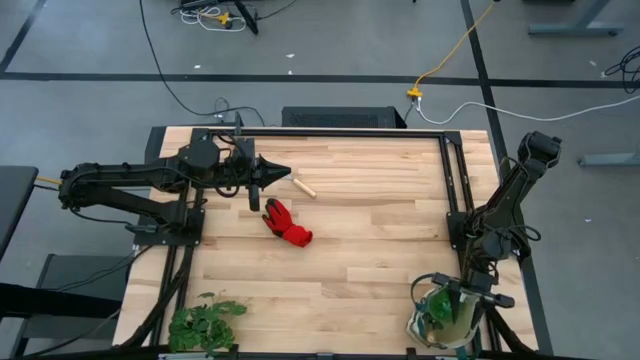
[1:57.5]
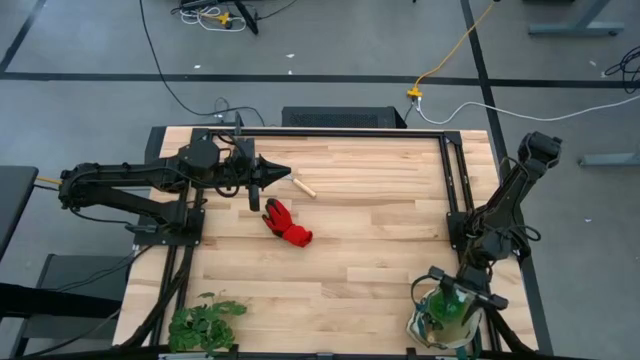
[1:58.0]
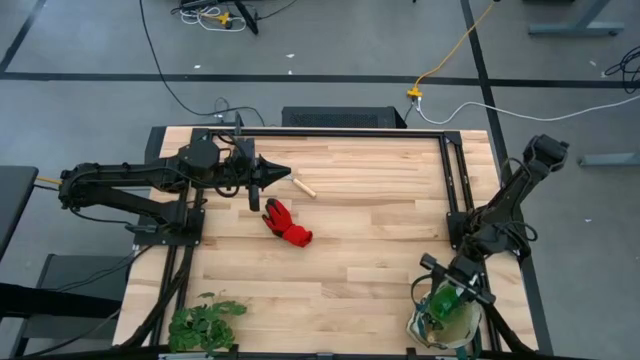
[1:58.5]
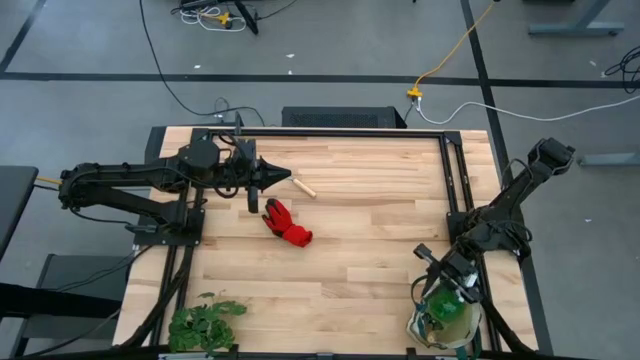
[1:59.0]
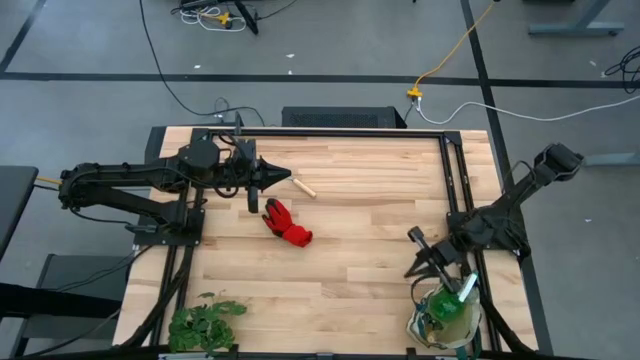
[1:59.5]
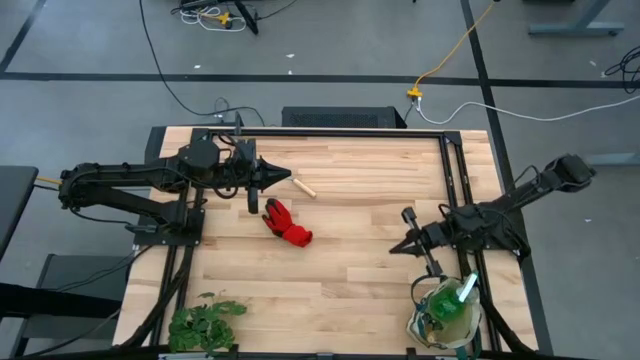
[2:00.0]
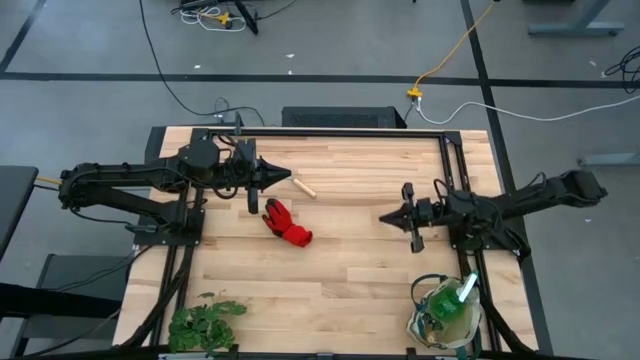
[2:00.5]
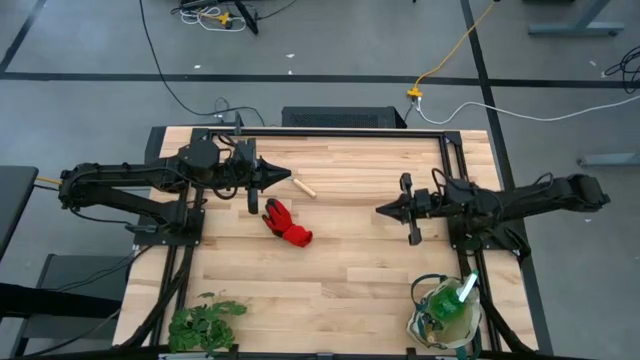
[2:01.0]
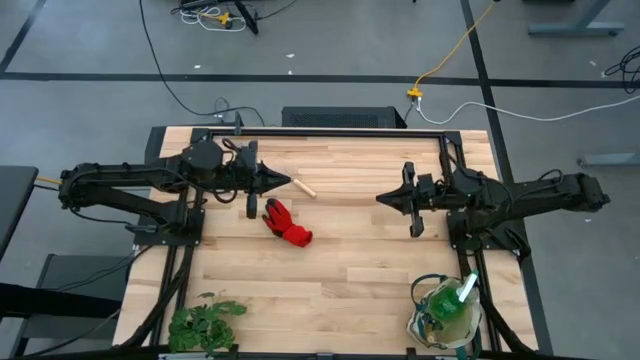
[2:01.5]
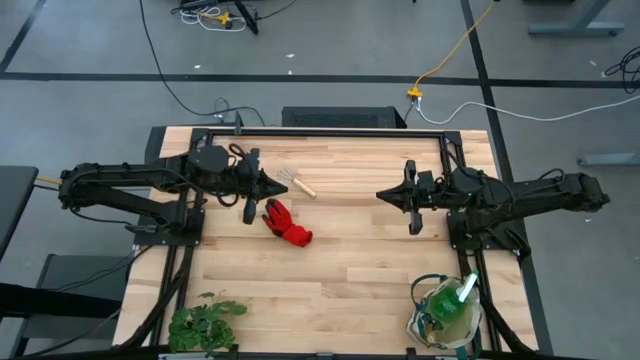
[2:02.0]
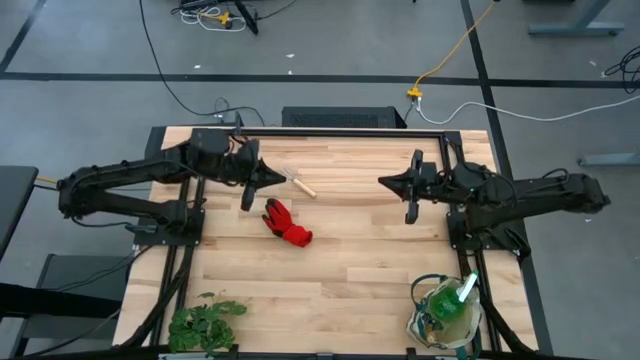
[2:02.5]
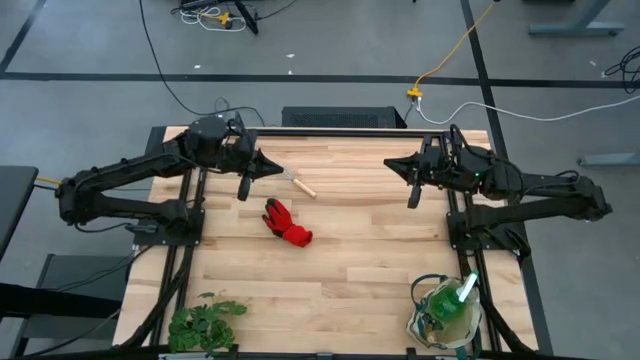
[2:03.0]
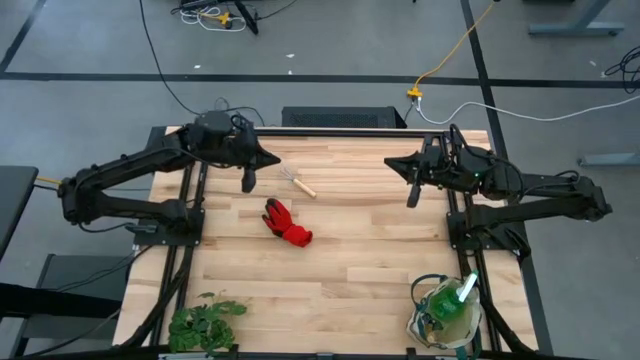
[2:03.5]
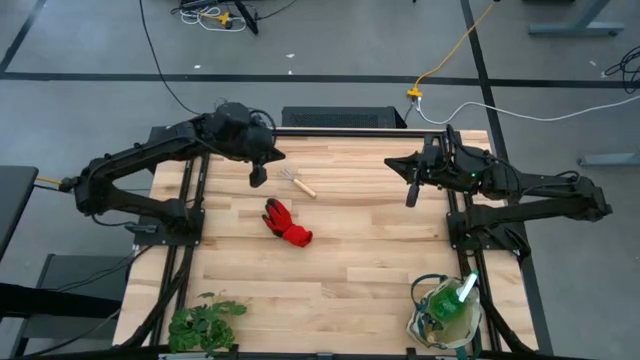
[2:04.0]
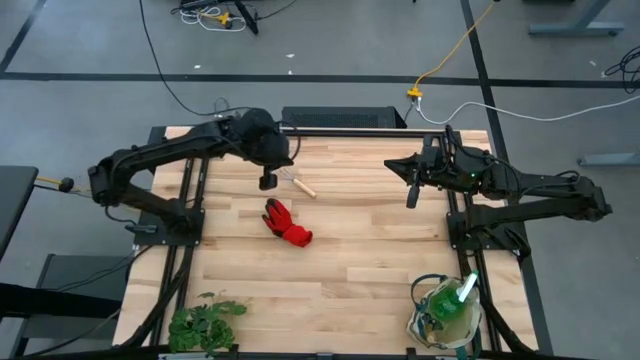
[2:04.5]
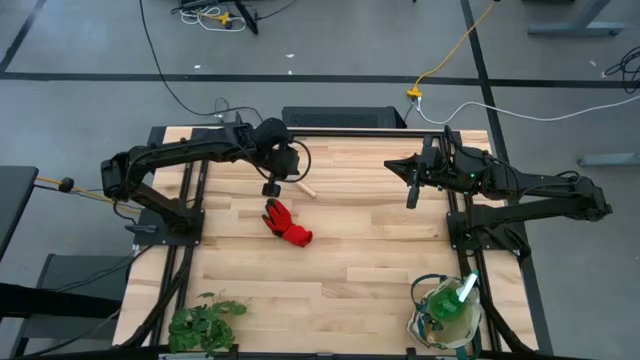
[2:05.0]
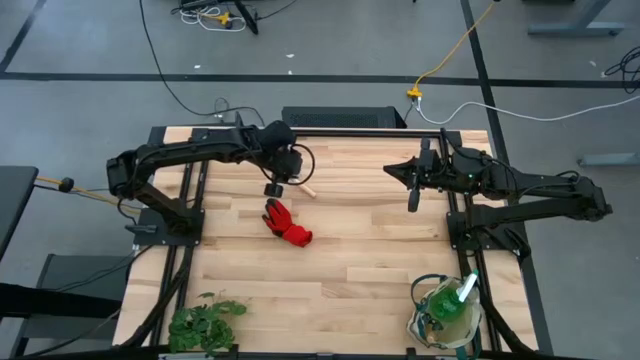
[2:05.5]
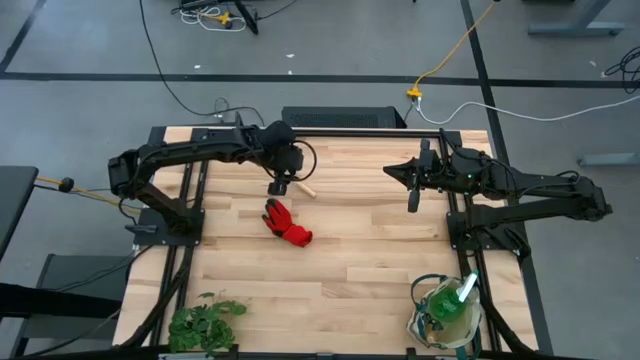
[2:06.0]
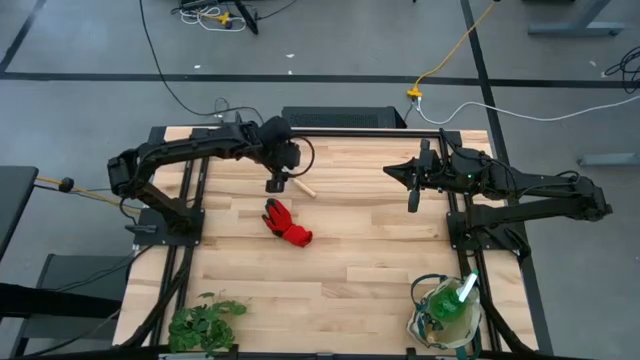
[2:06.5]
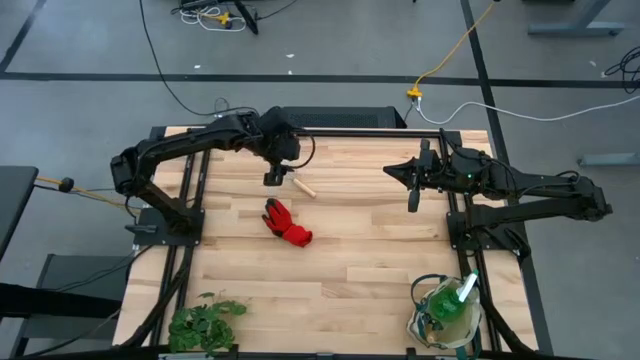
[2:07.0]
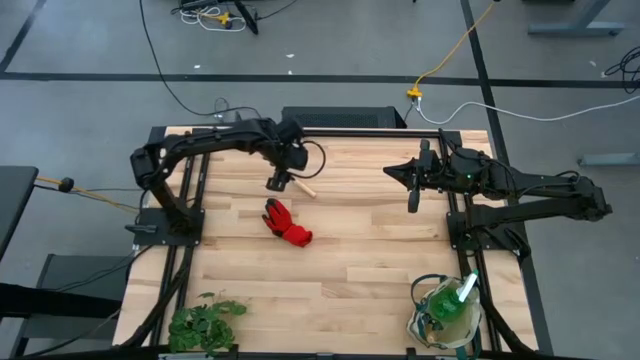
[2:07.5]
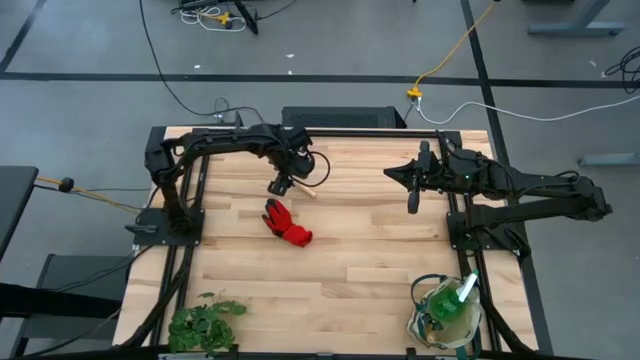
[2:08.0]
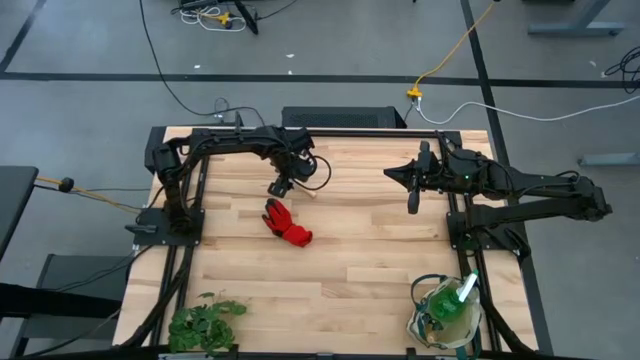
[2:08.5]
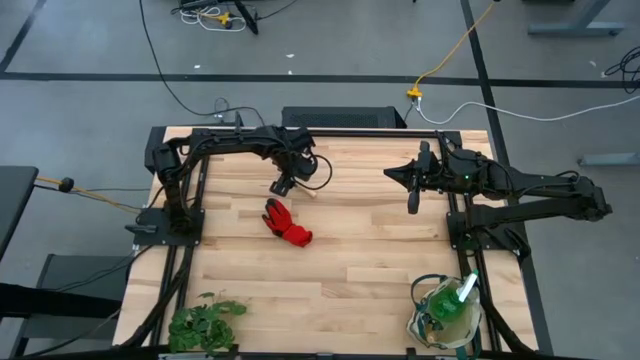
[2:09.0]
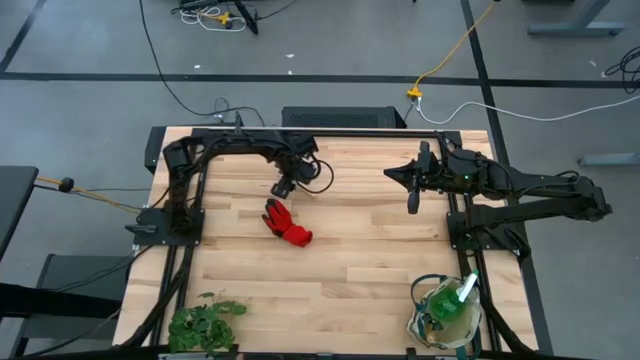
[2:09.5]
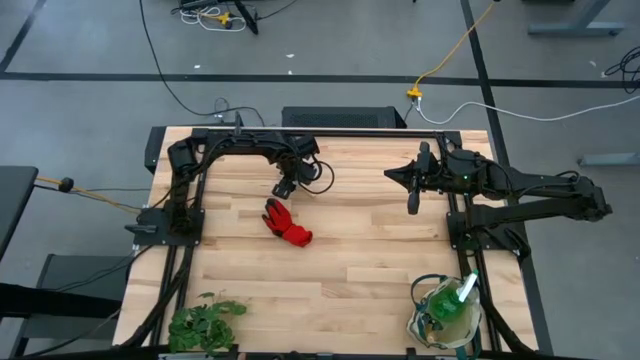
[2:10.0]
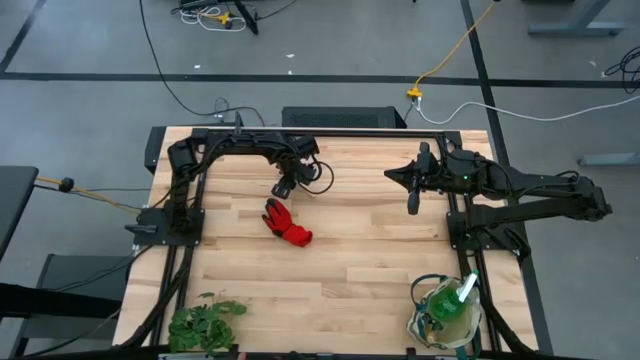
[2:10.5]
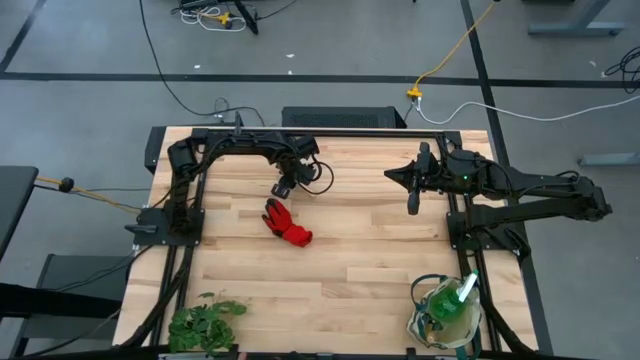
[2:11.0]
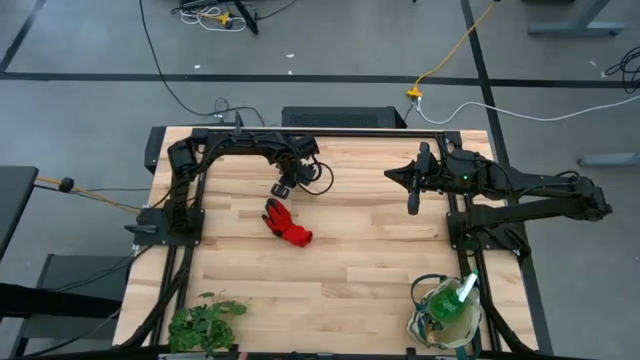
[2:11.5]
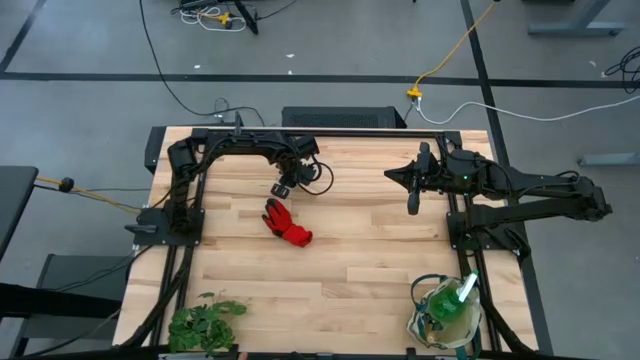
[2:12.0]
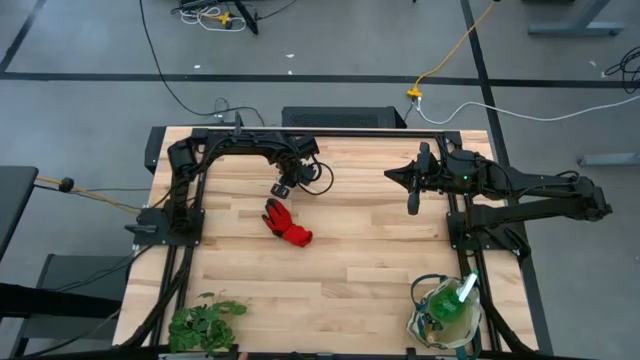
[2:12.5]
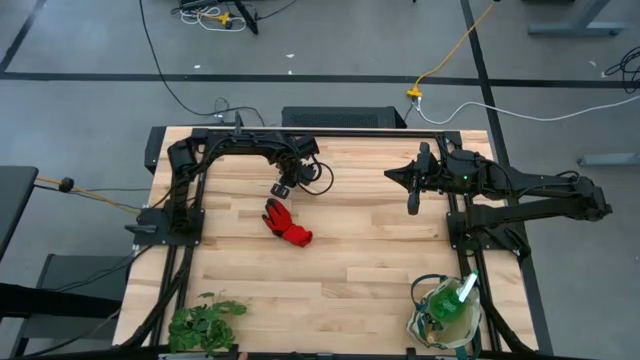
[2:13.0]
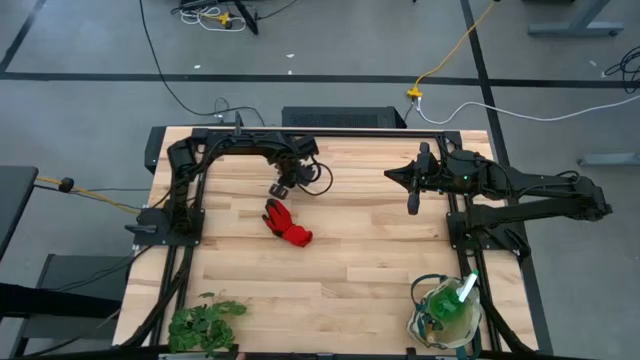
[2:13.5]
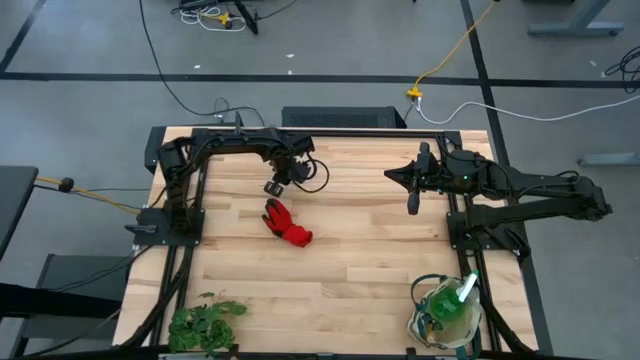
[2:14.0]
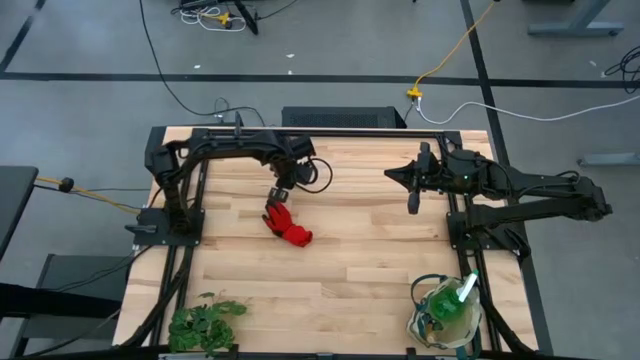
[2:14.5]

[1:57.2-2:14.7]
Task: Pick & Place Garden tools in Gardening bag
Put the hand rake into the gardening bag

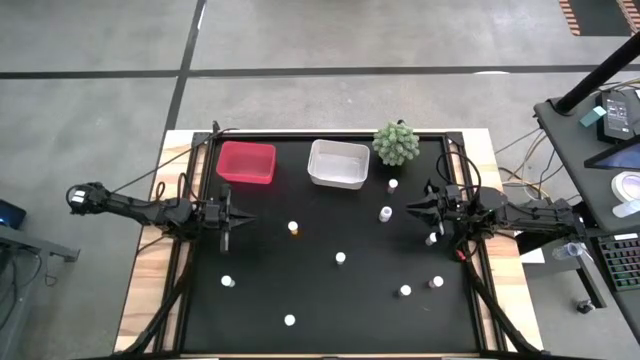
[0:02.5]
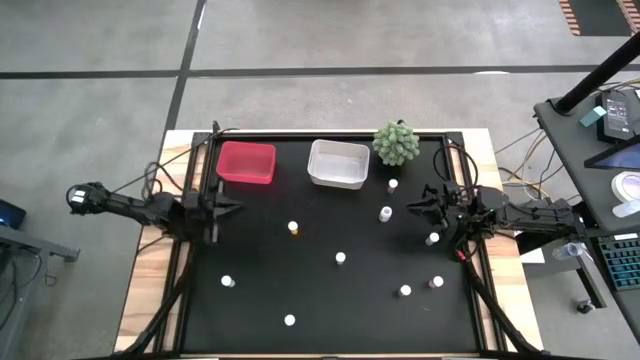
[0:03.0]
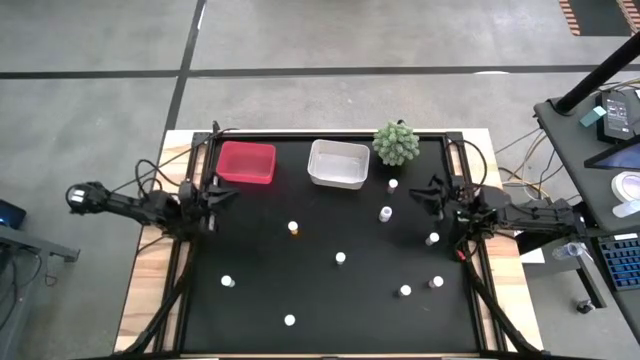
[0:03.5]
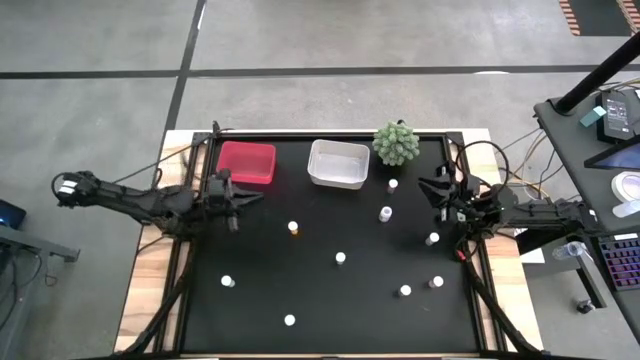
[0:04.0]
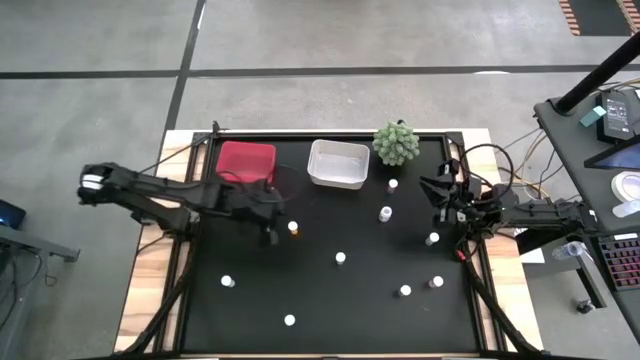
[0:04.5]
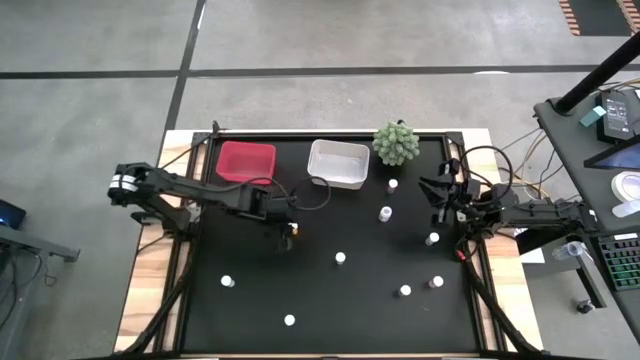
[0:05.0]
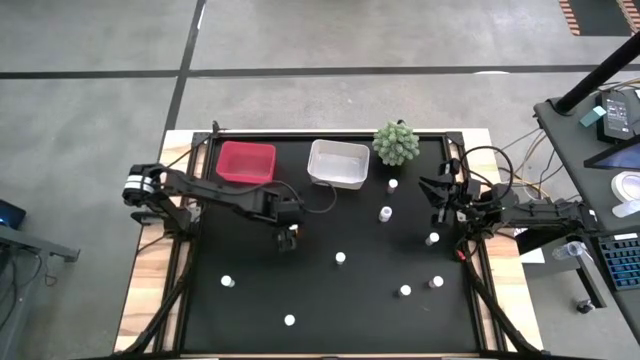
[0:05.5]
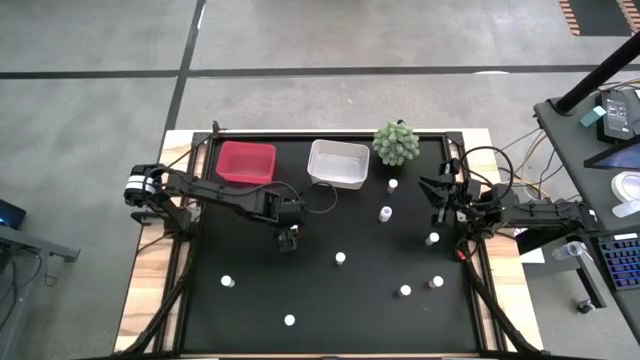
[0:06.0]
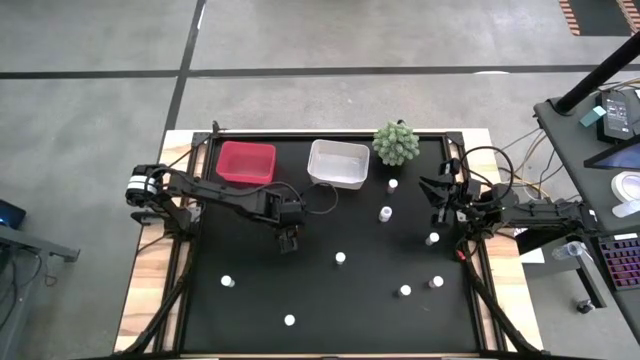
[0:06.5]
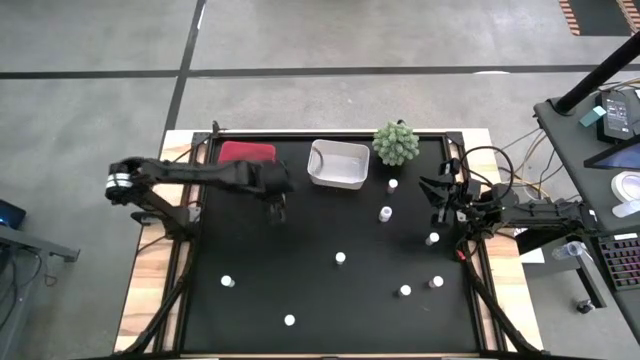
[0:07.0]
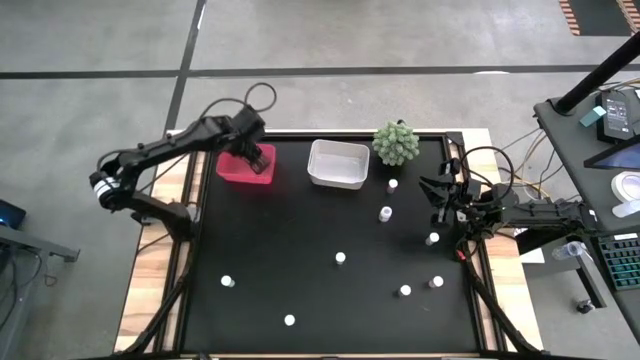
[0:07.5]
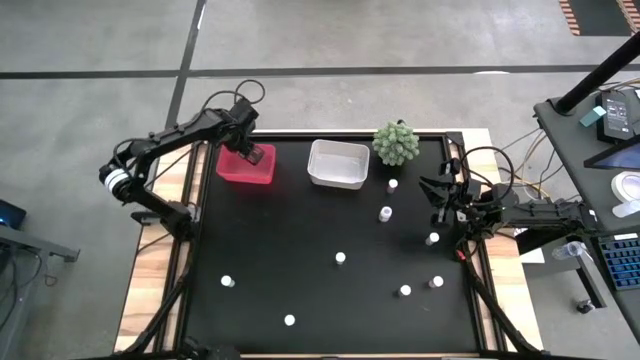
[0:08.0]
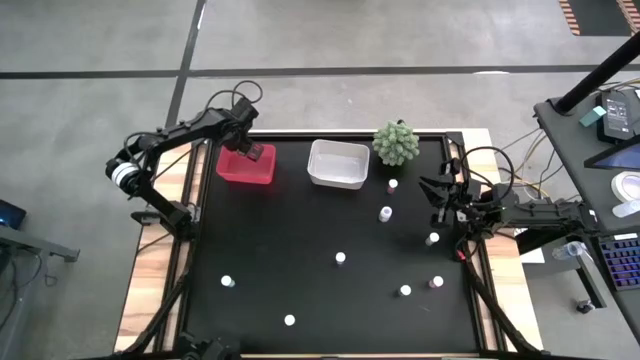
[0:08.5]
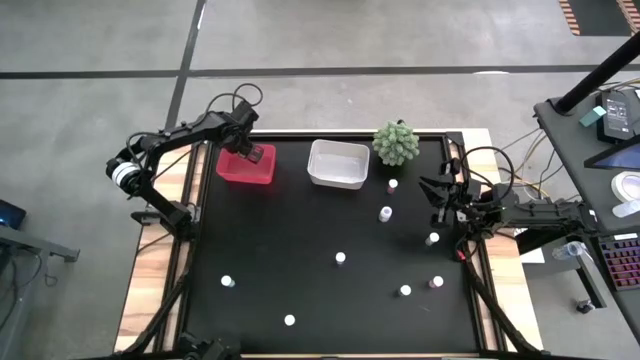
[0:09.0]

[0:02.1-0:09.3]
Task: Pick and place medicine bottles into bin by pill shape (circle, oval)
Put the orange tablet bottle into the pink bin
